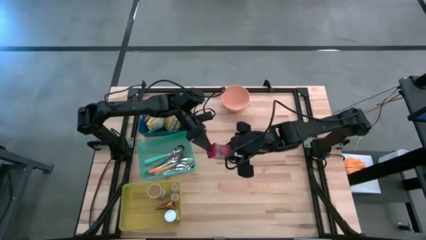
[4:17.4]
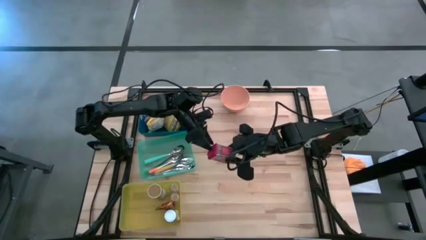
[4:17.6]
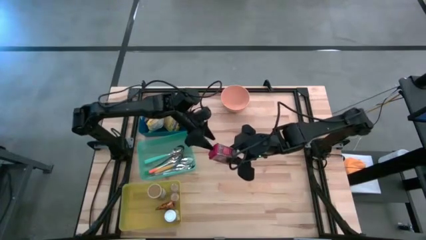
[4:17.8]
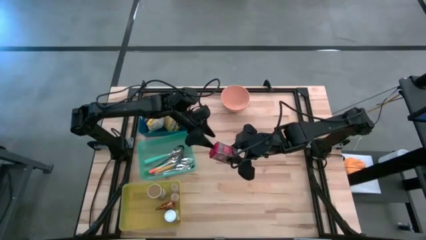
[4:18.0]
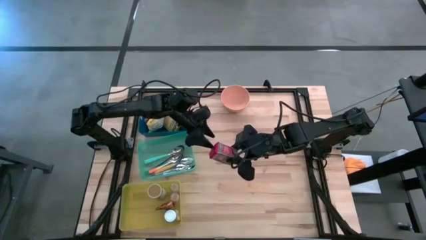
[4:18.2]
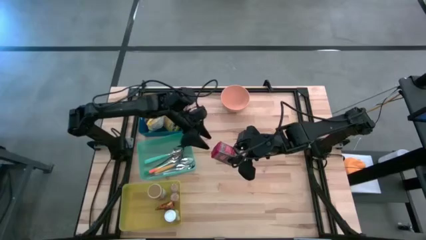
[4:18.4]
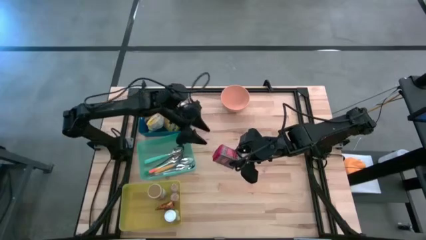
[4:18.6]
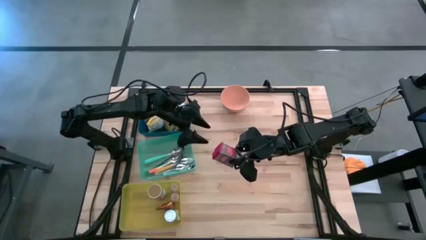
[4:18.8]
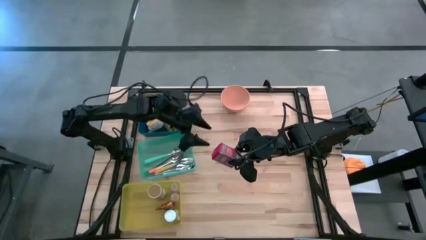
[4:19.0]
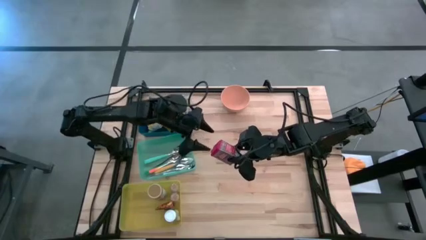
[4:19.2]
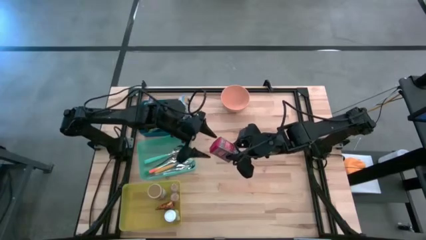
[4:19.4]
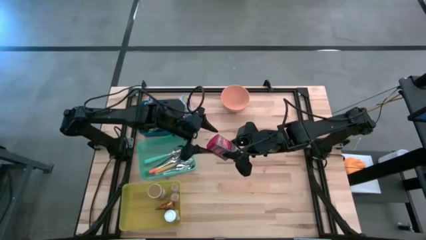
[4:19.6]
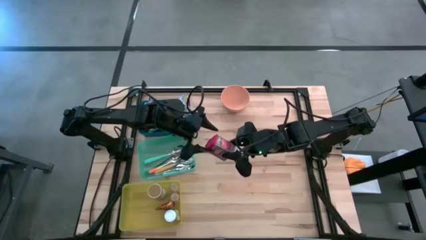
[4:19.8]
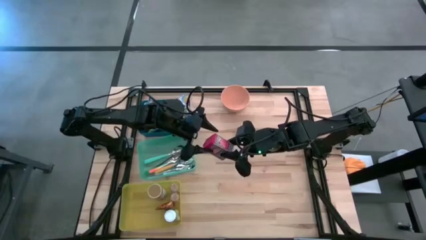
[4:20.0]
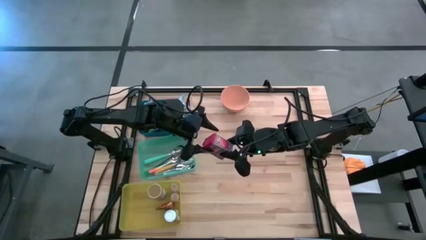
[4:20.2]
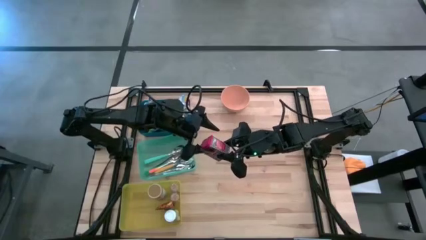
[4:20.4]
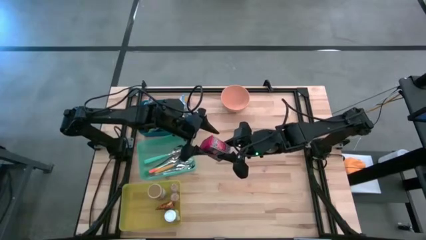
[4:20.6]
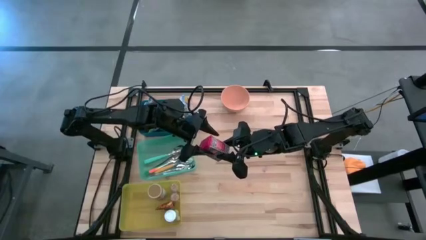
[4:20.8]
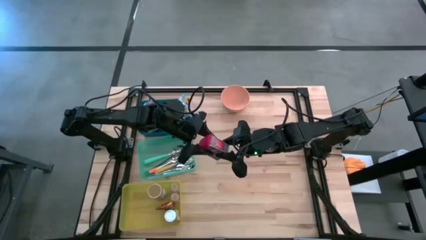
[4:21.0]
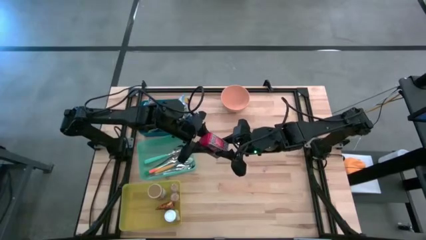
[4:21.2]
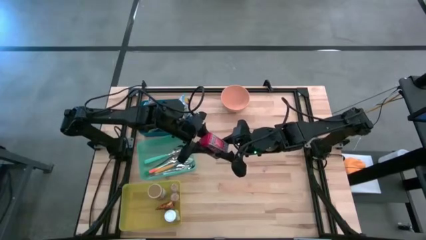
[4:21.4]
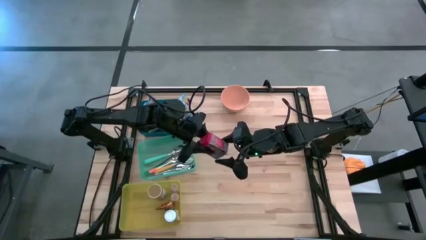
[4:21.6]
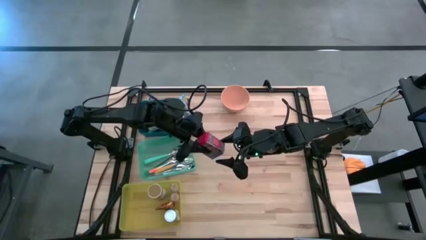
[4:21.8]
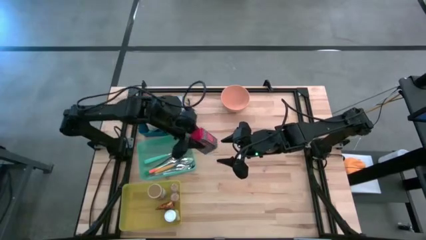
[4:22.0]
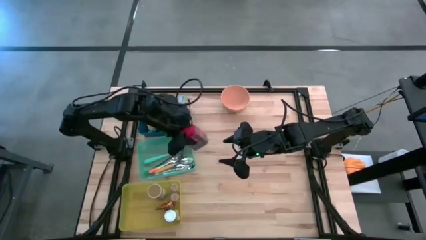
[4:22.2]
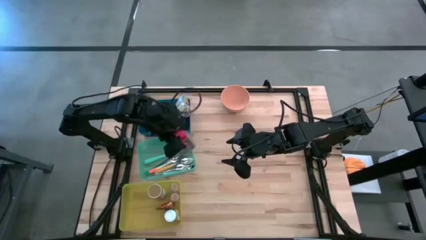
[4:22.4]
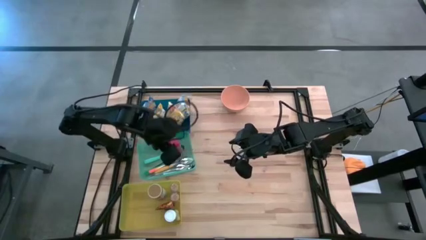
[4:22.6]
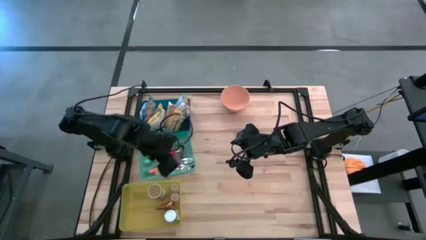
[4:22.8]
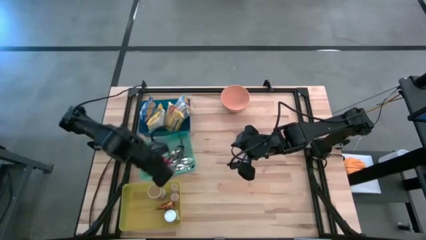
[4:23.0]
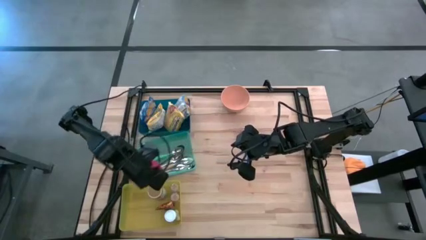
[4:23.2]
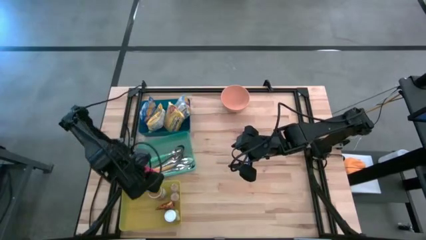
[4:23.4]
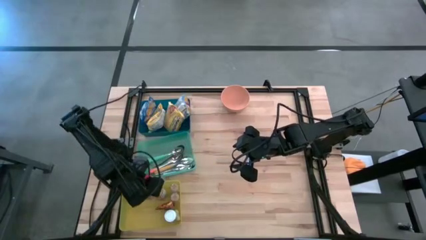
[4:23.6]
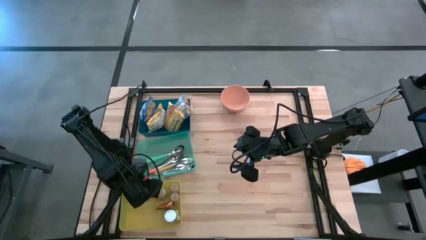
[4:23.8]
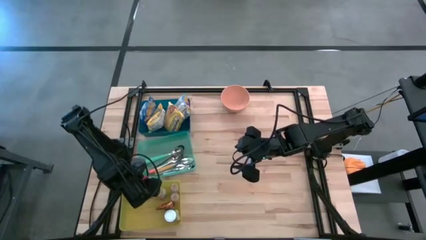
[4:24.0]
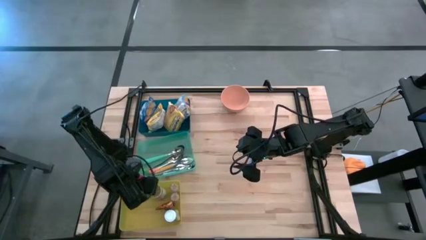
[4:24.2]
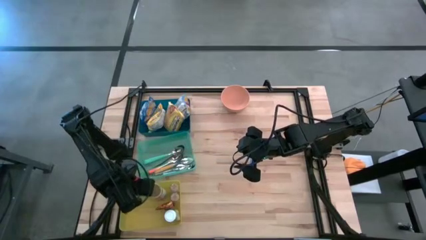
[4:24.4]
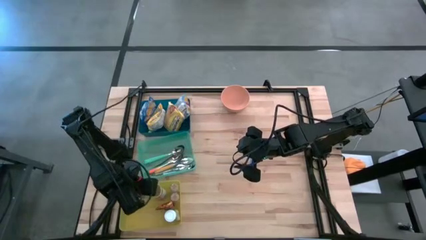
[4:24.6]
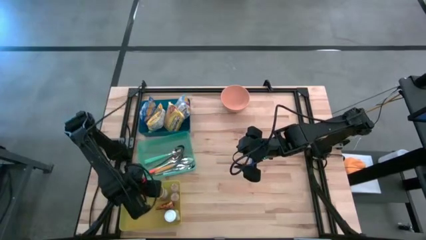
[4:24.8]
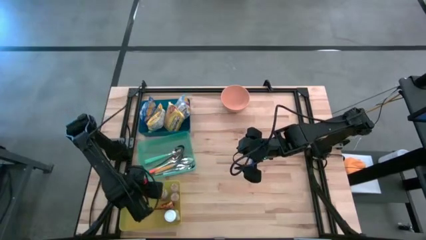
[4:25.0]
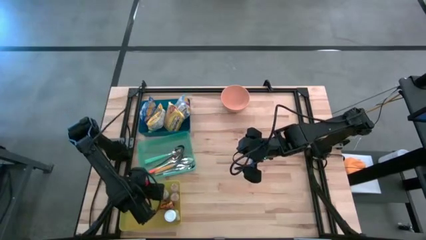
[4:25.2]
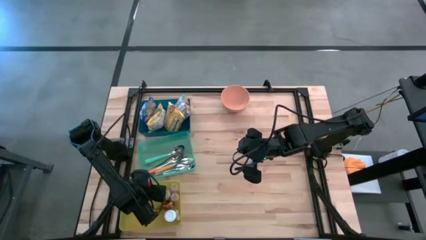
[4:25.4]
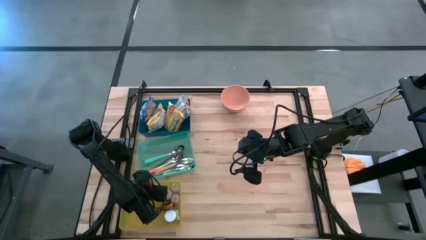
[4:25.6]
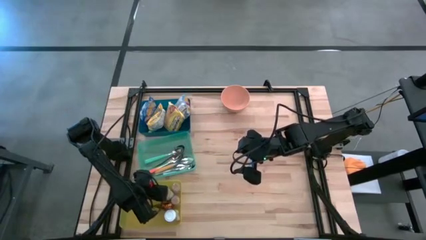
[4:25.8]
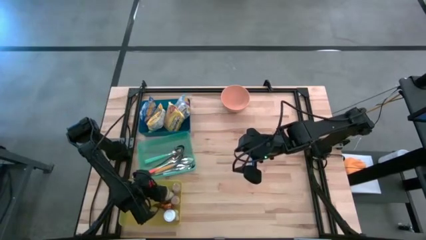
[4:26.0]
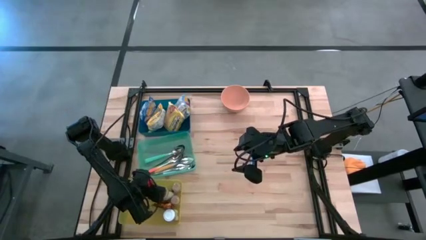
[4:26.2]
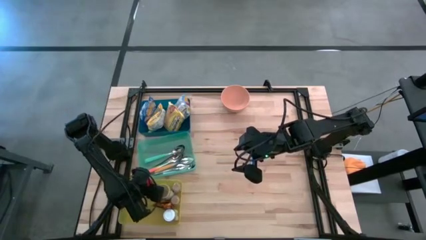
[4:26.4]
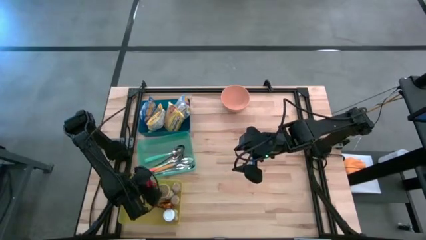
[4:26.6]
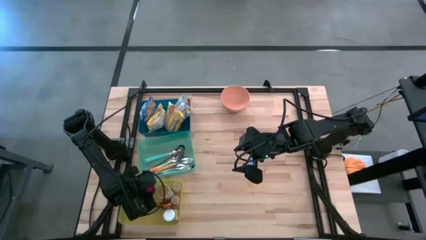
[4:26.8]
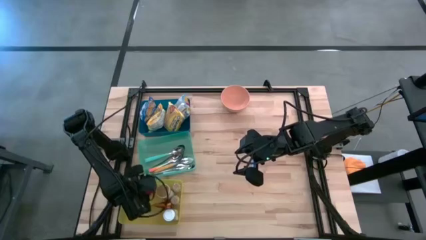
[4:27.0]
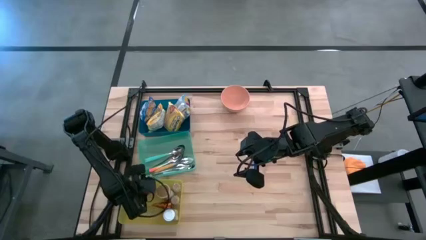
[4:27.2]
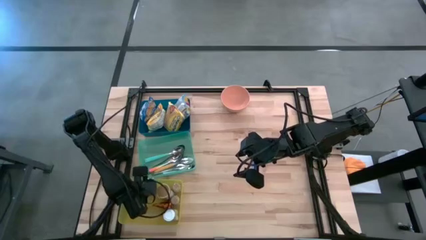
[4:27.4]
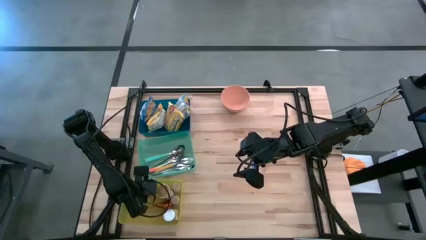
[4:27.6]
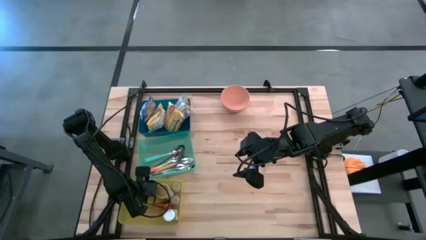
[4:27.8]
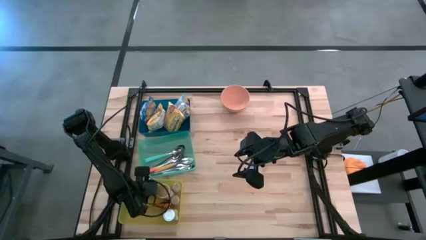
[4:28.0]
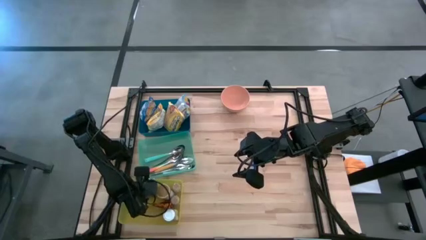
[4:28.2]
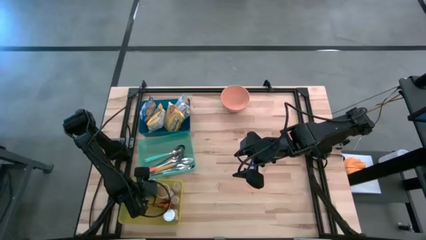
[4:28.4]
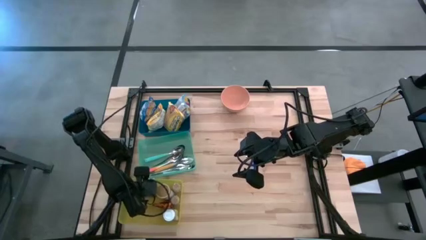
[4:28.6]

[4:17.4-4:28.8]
Put the red spice can into the yellow bin

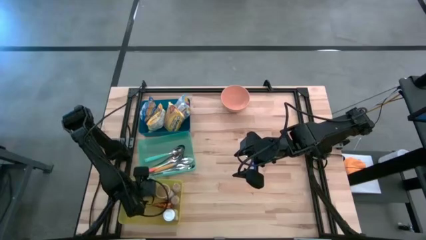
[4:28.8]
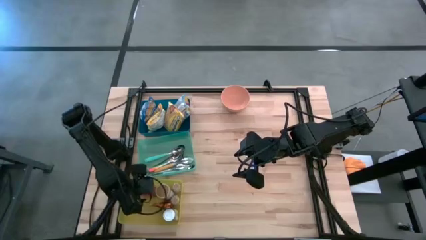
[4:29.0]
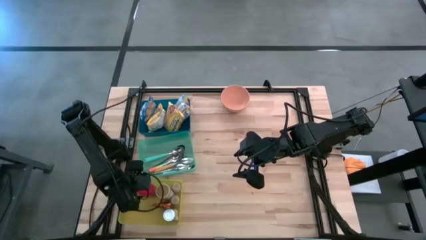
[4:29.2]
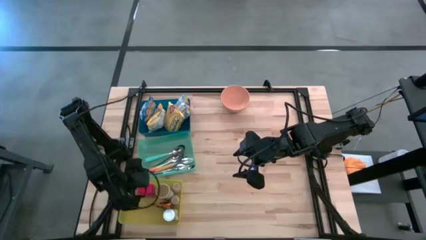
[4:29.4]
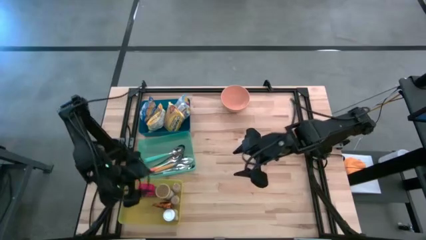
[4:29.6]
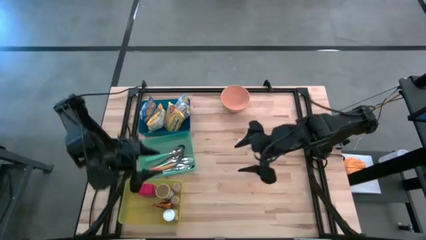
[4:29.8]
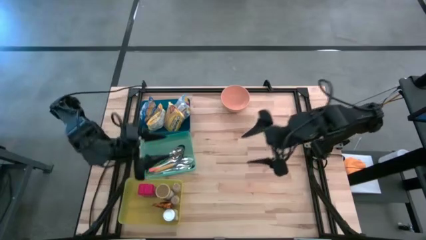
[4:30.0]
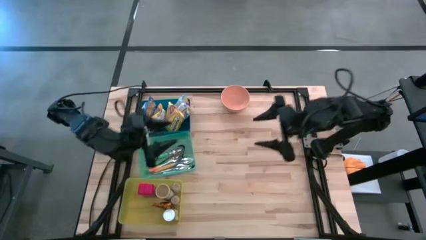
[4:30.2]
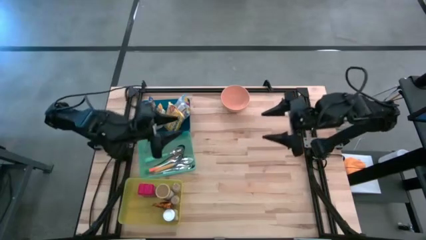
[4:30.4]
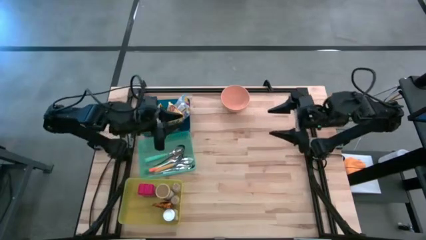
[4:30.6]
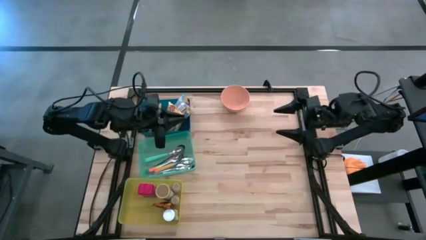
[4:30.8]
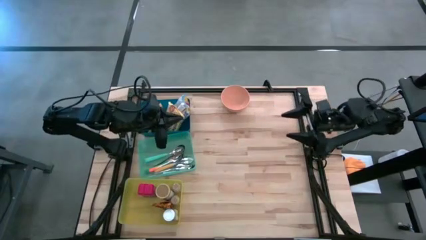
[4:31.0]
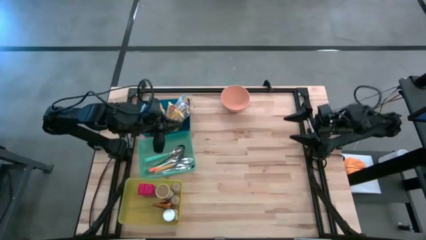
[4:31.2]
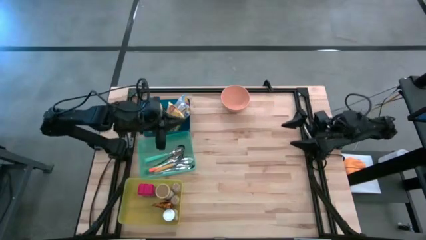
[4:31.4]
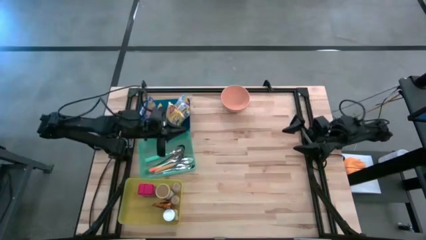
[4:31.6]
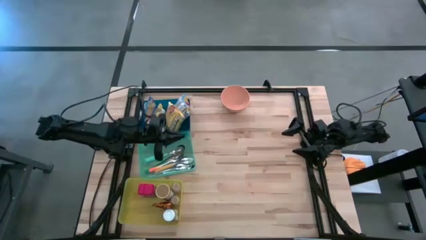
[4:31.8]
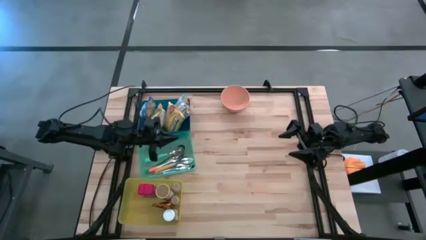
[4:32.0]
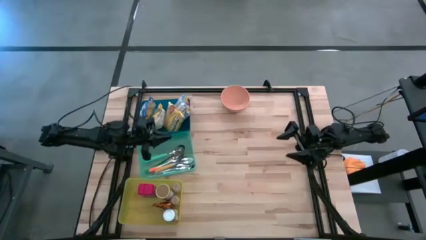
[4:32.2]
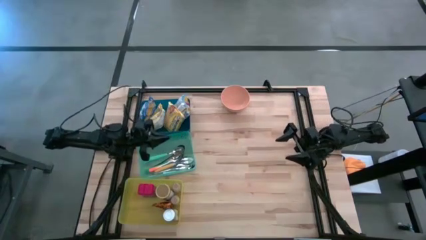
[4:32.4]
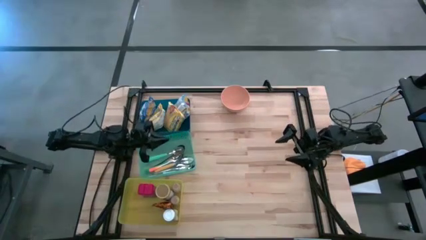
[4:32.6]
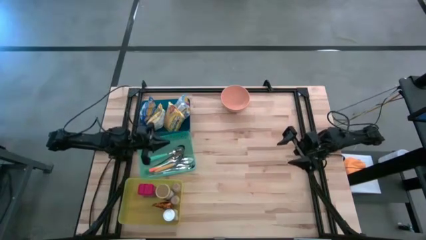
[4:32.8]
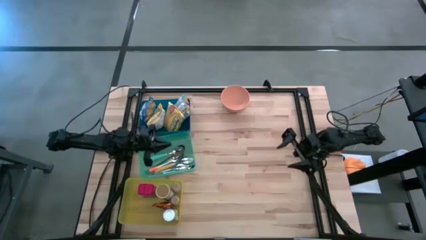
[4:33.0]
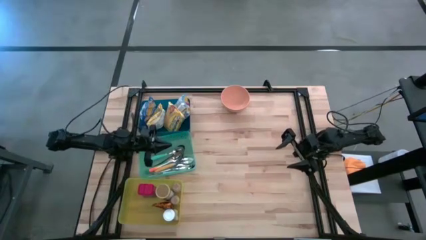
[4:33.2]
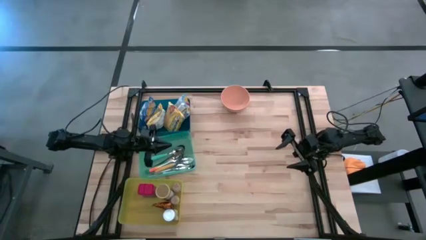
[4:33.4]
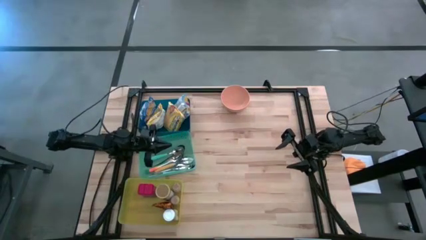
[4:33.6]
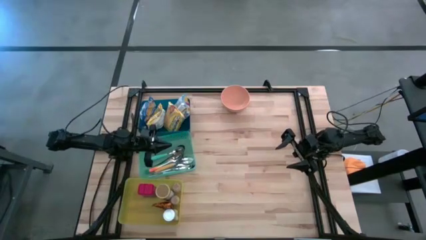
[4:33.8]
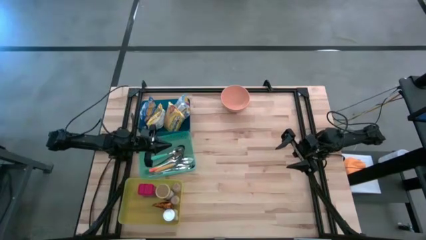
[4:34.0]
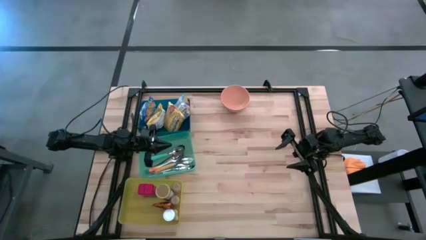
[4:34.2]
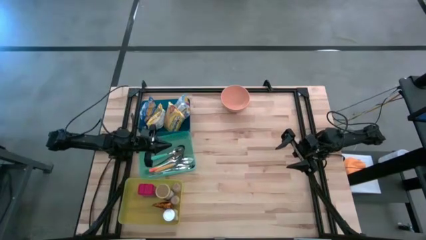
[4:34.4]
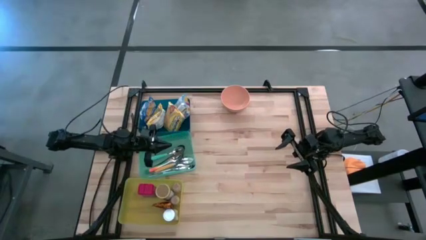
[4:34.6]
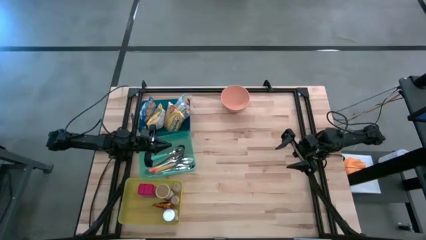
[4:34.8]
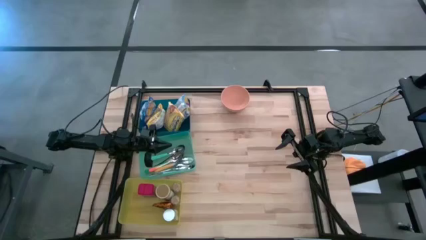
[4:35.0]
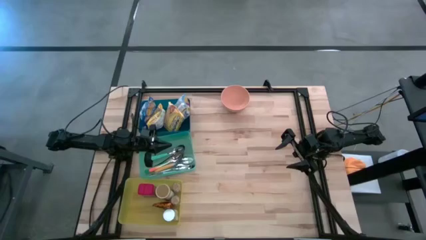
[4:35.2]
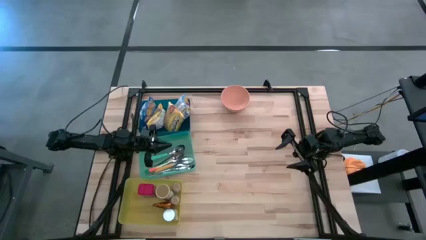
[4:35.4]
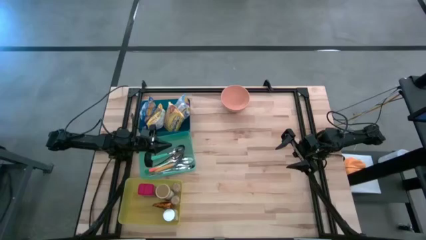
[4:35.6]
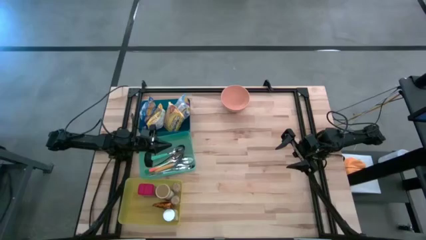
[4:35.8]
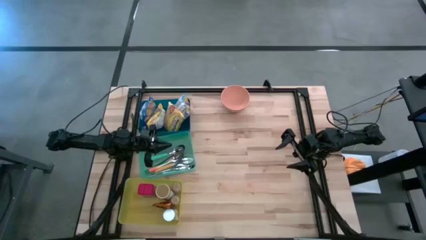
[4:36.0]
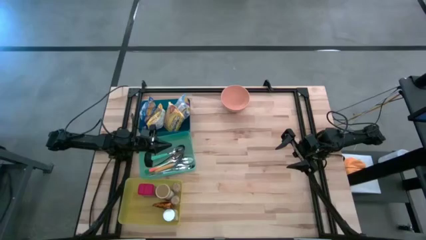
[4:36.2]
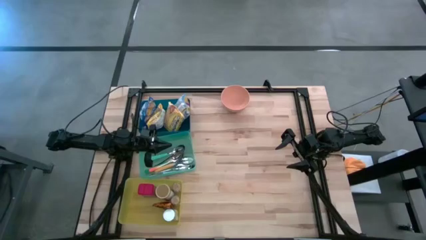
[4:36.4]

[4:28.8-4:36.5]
Return to Home Position
